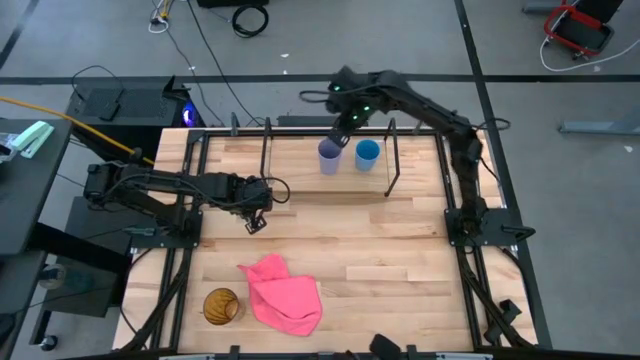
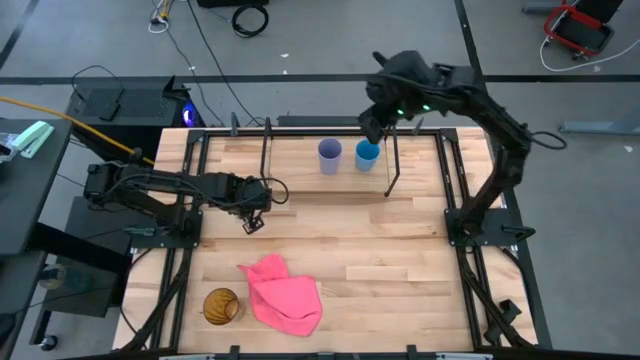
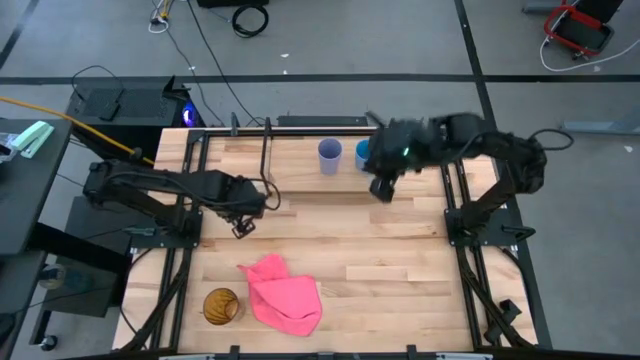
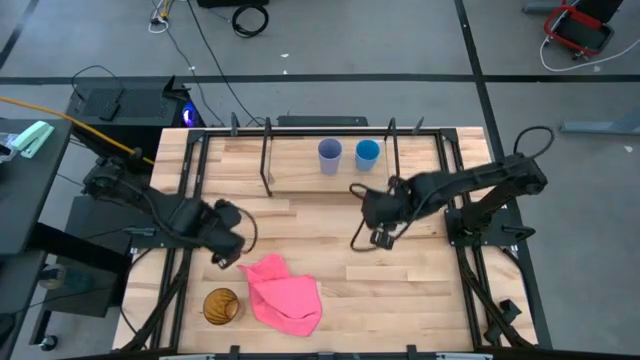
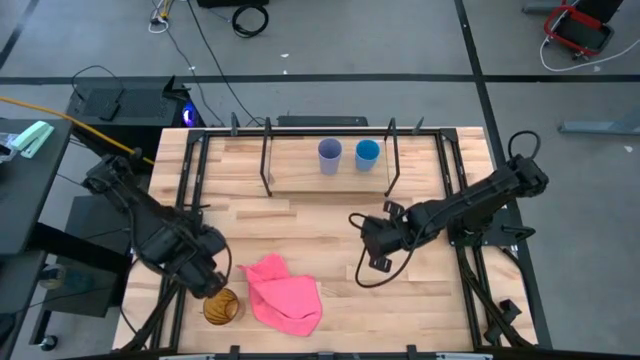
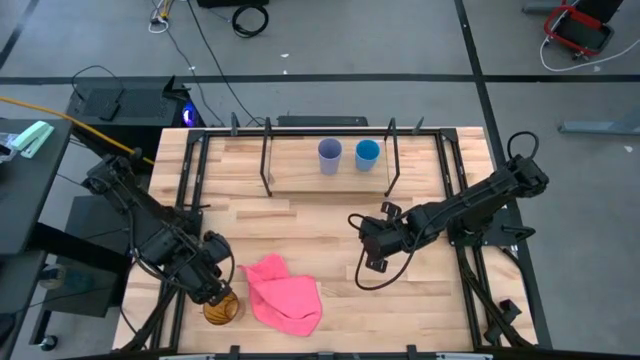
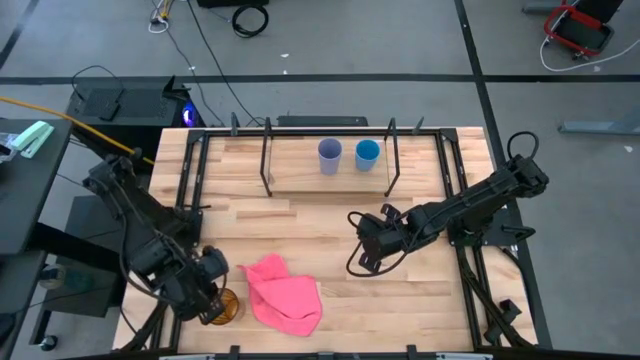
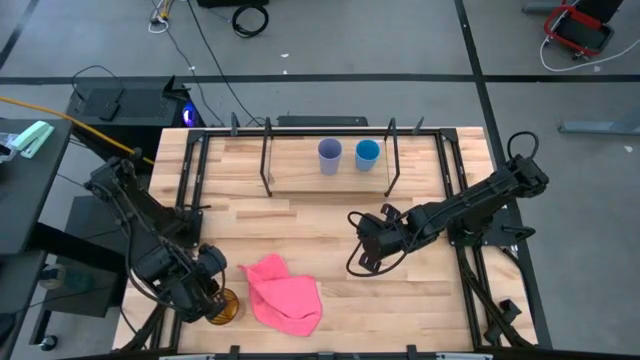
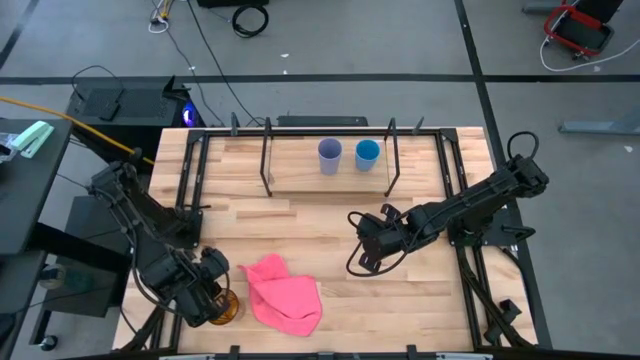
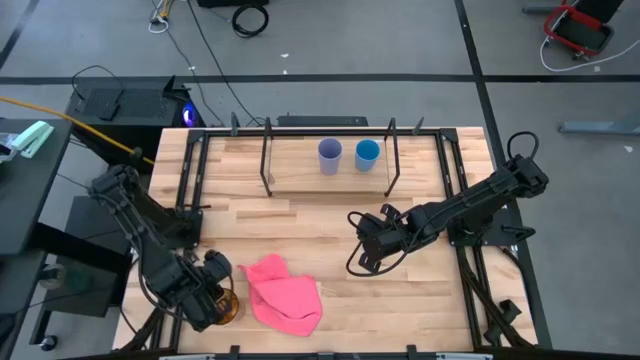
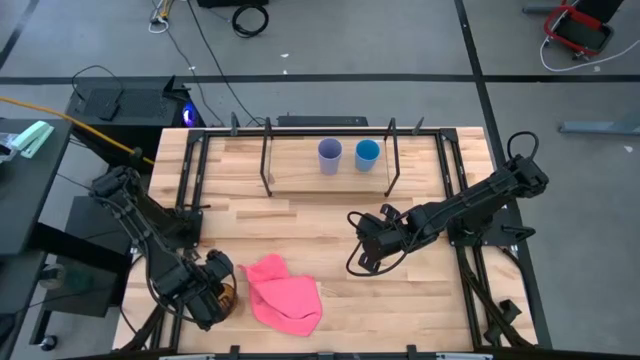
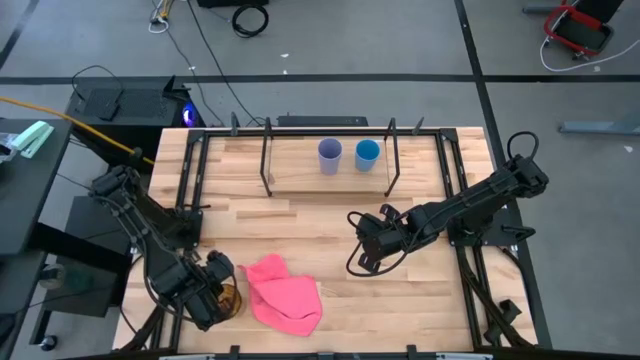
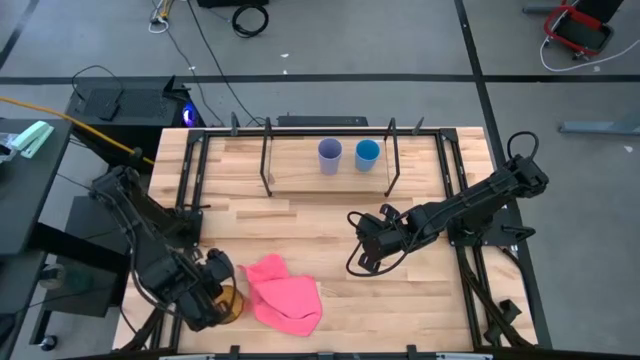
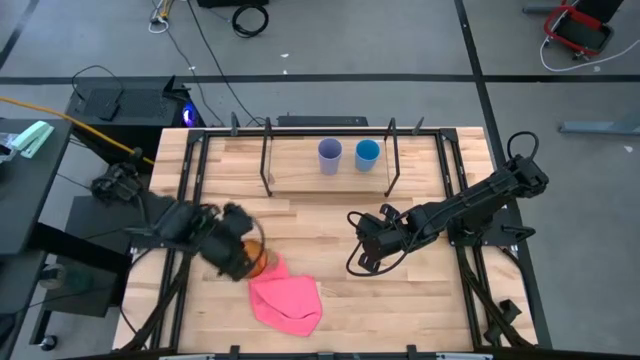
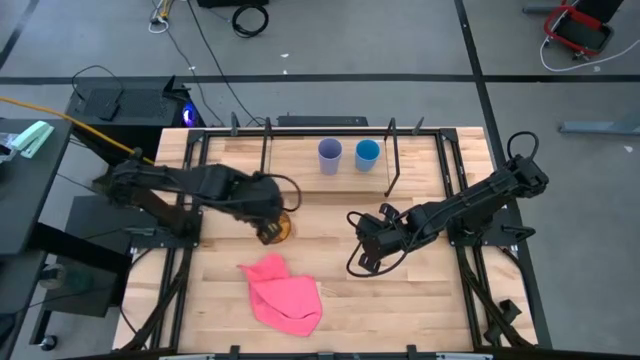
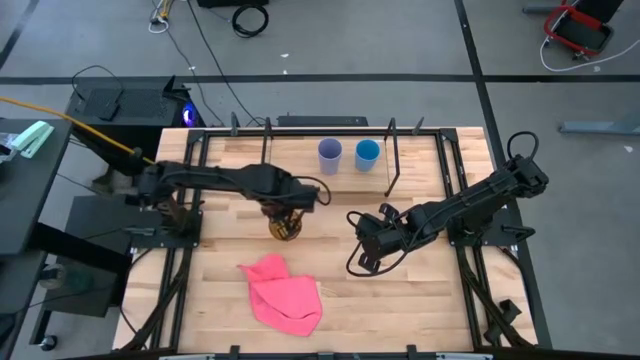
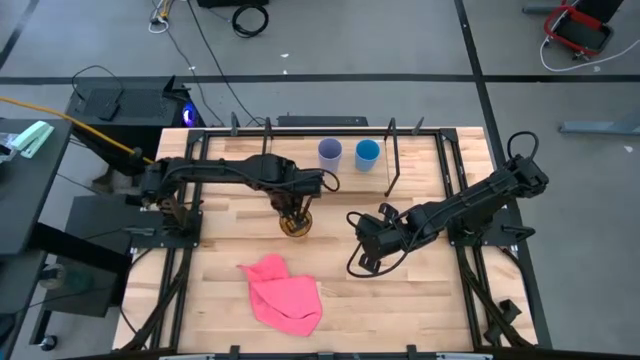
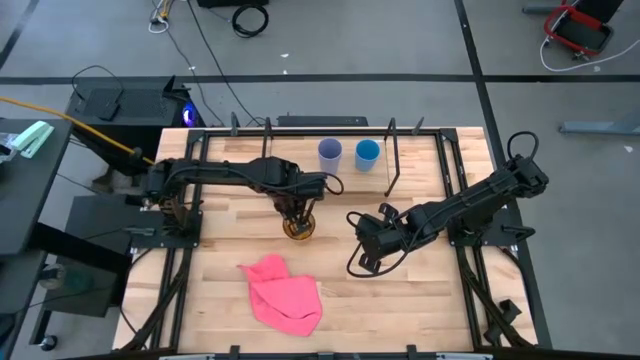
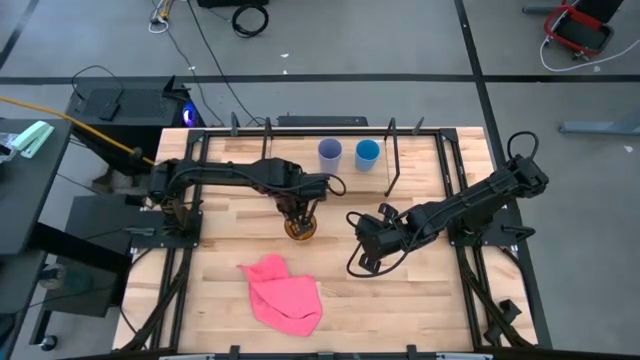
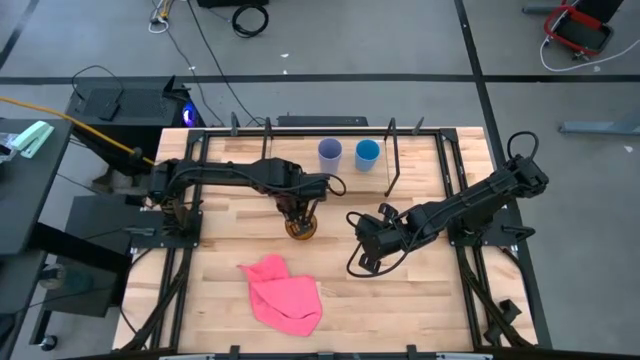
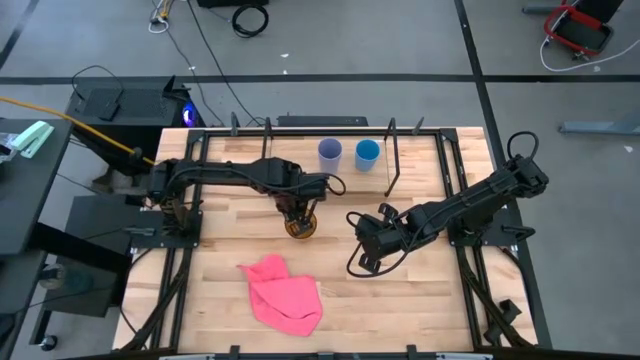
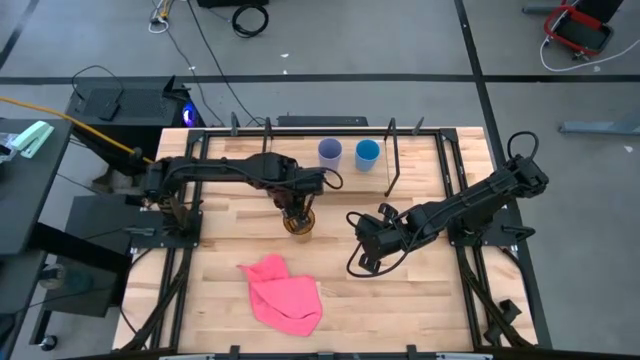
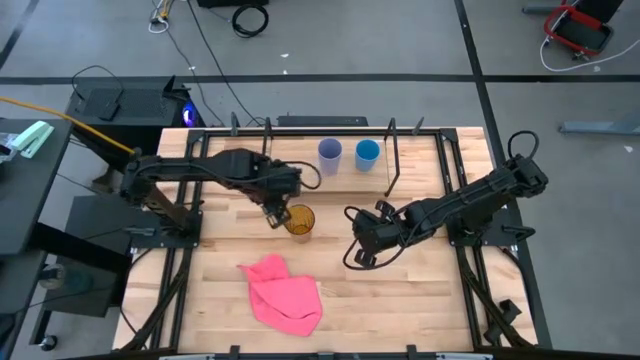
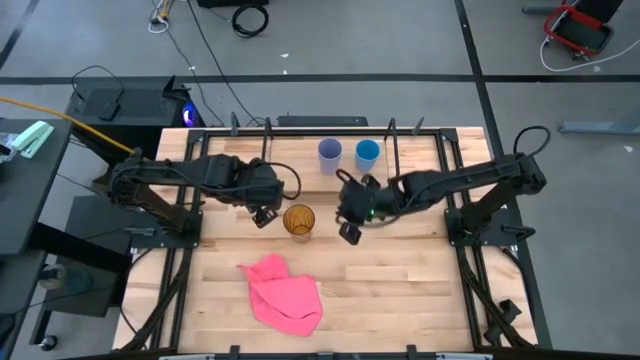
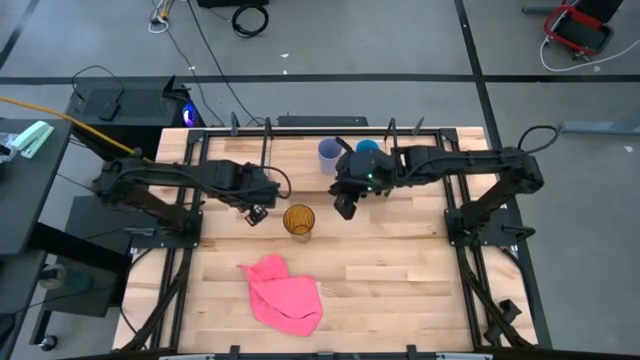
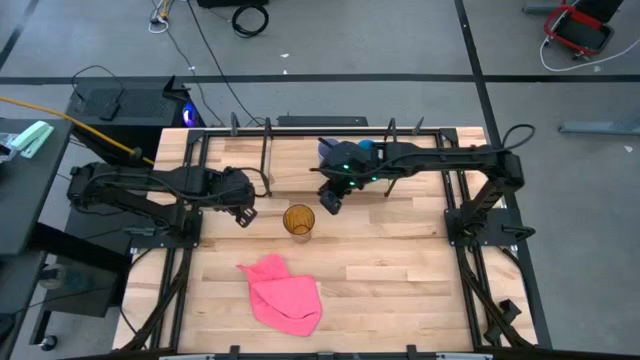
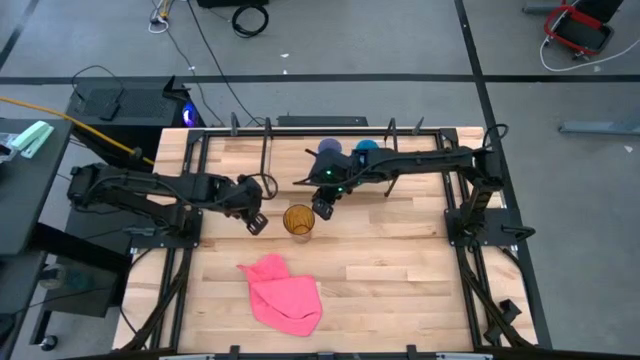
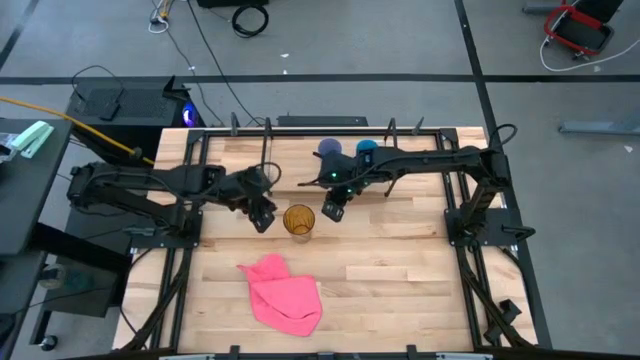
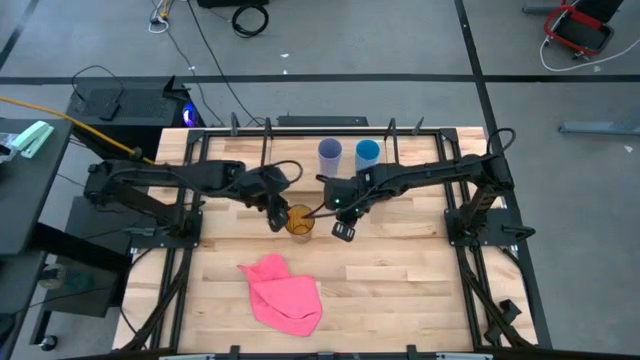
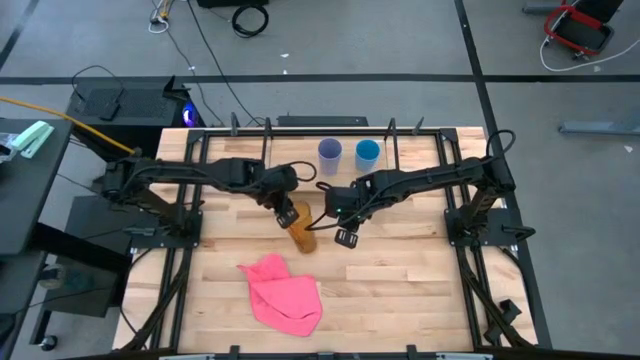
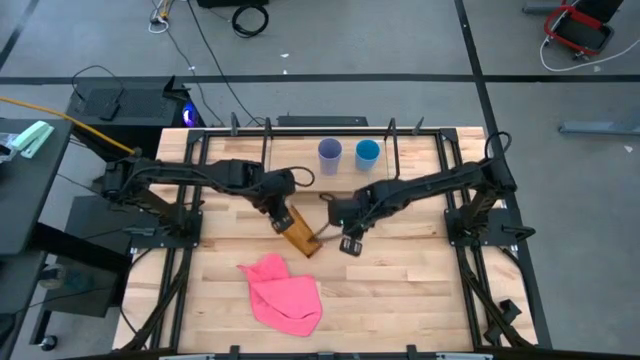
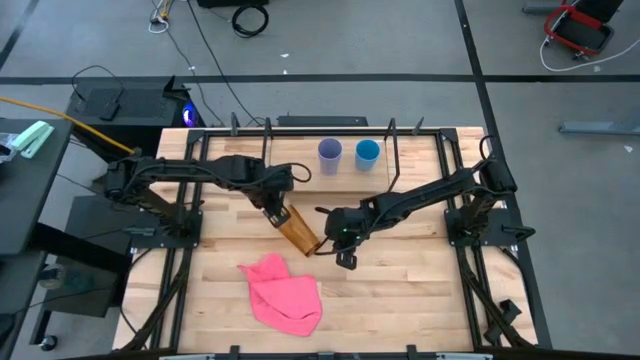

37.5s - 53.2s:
Task: Stack small to large cups/mugs on shelf
Put the light brown cup on the shelf

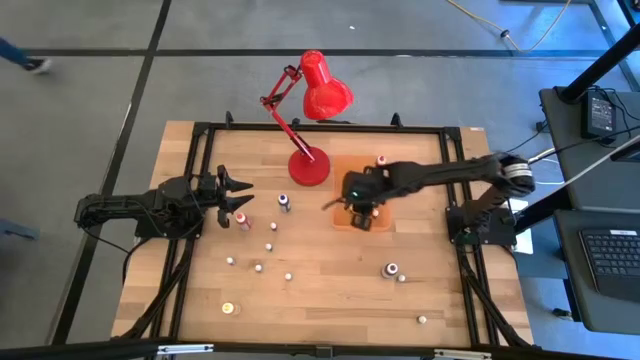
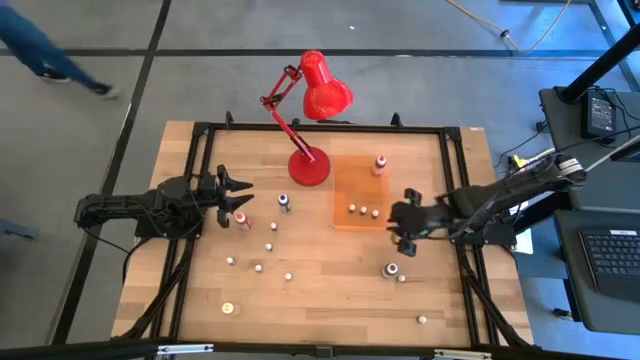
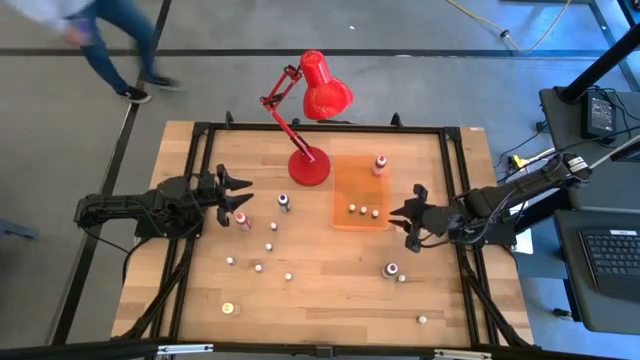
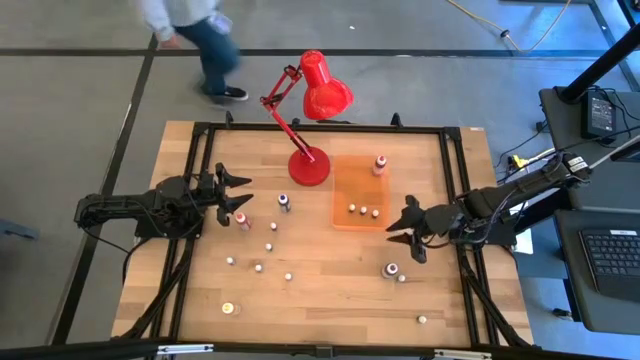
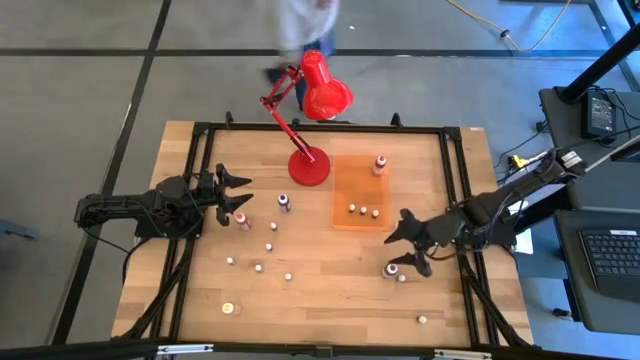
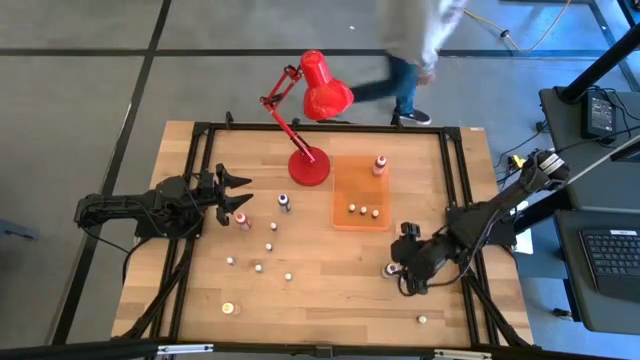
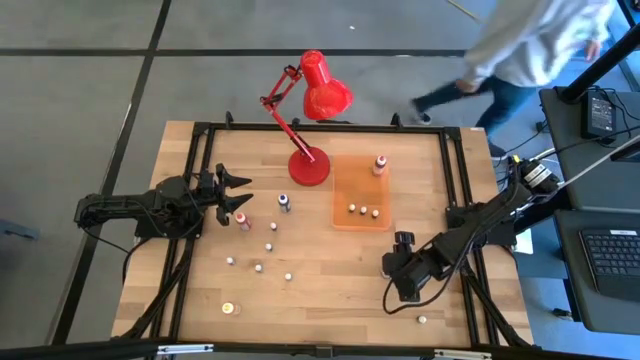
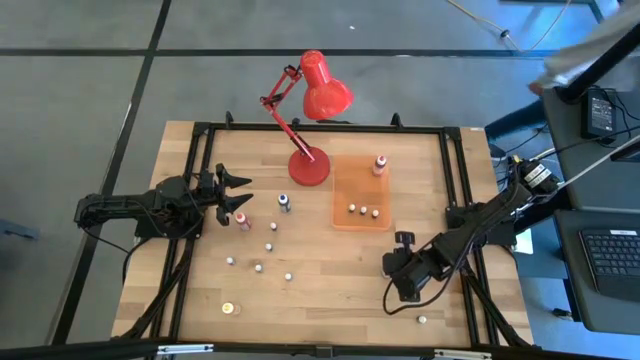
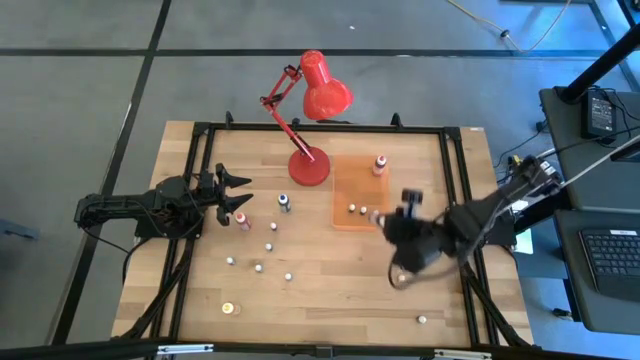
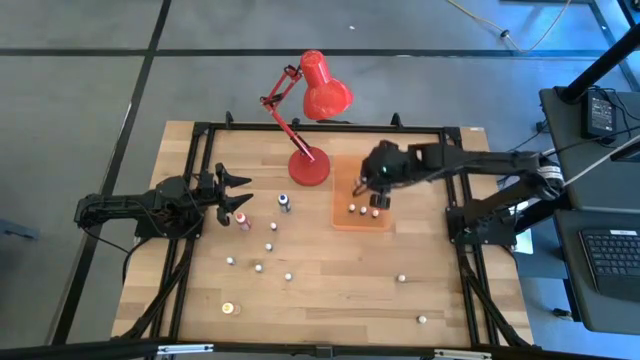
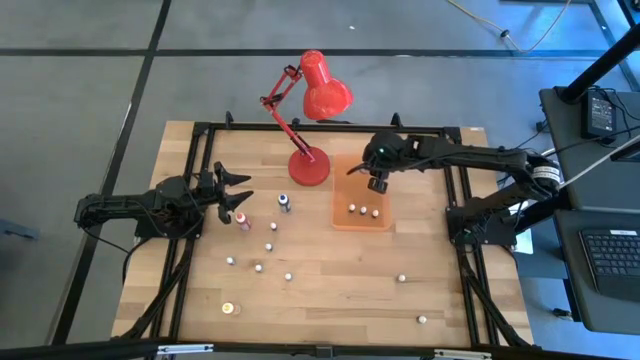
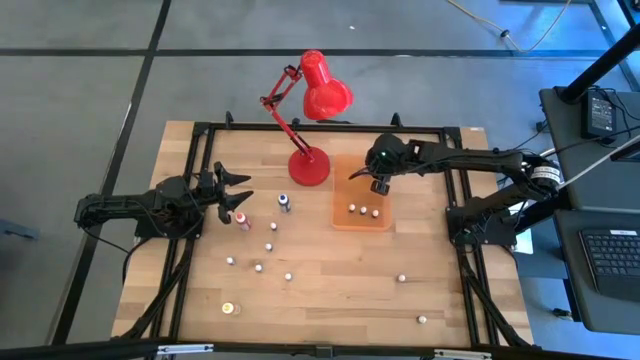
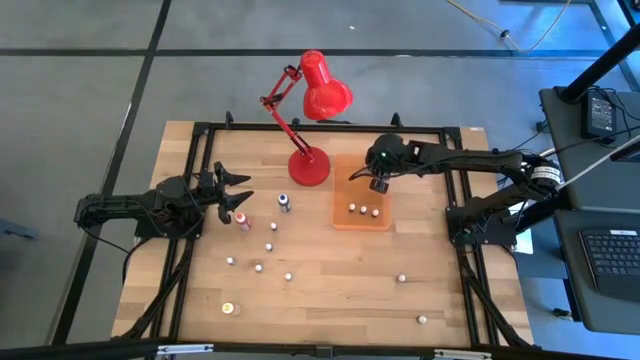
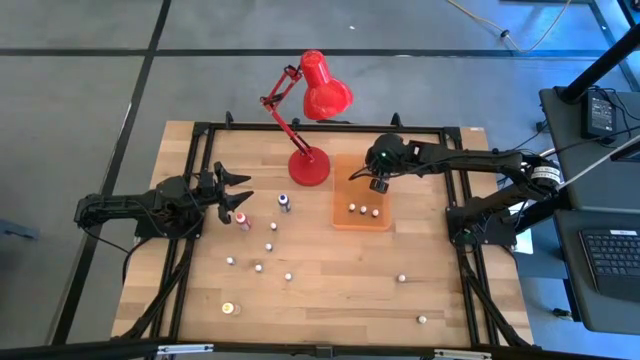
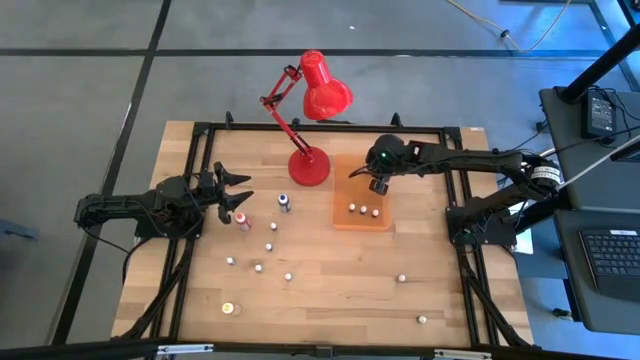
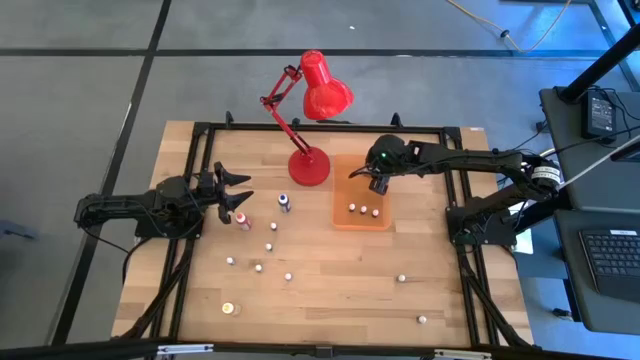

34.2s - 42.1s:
Task: Pick & Place food coloring
Put the large purple food coloring bottle into the orange bin
